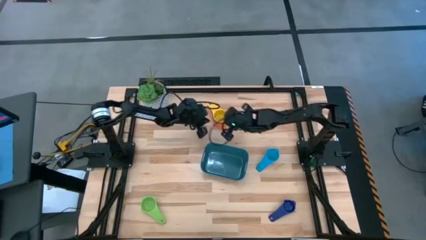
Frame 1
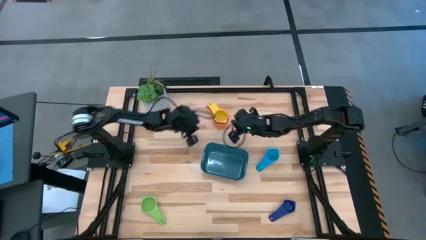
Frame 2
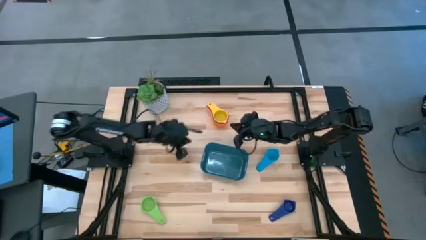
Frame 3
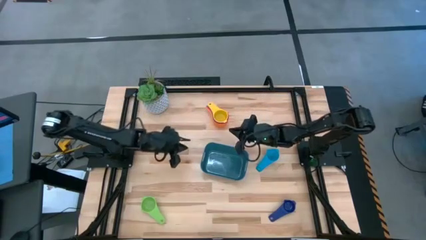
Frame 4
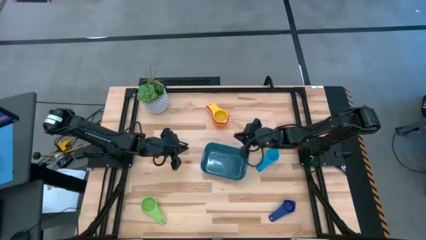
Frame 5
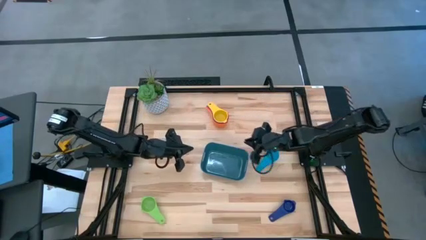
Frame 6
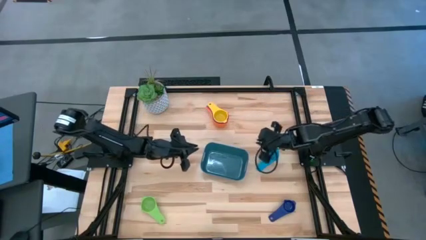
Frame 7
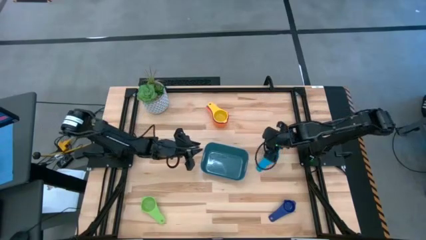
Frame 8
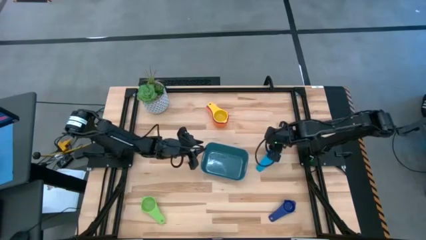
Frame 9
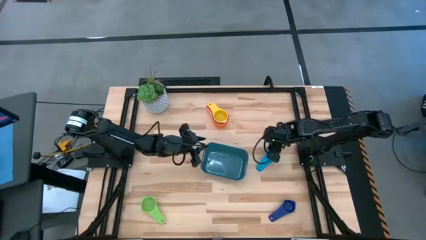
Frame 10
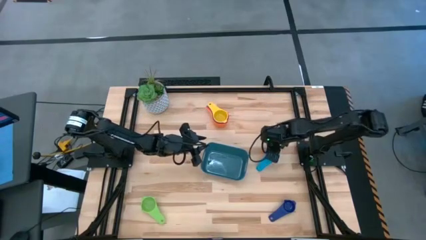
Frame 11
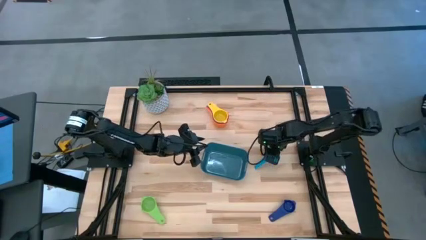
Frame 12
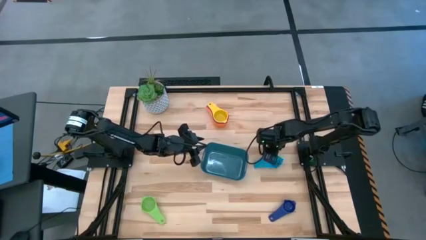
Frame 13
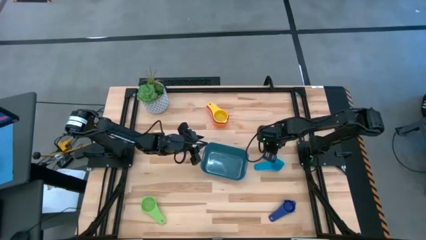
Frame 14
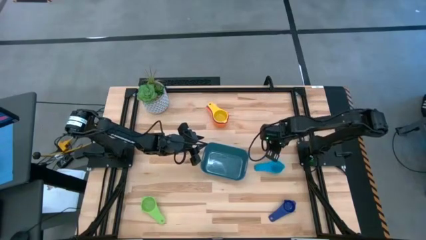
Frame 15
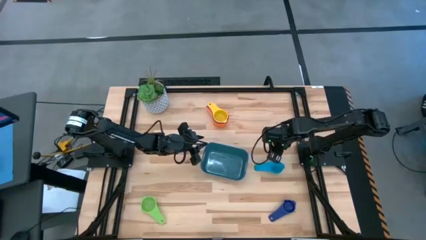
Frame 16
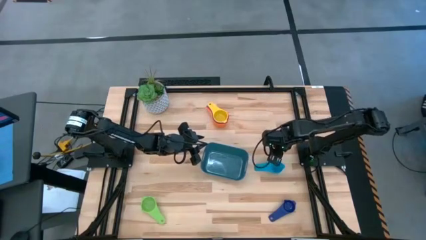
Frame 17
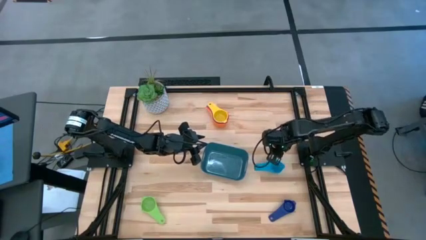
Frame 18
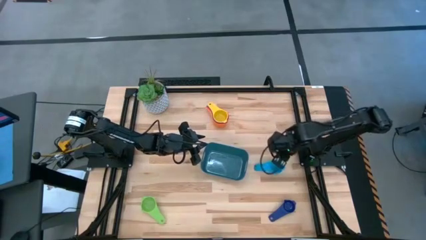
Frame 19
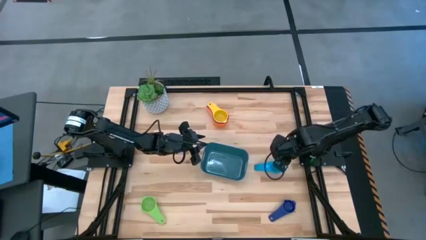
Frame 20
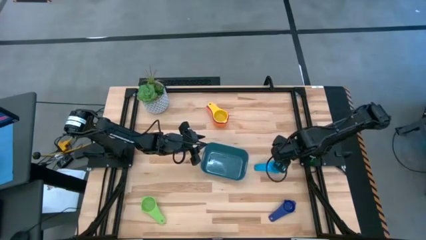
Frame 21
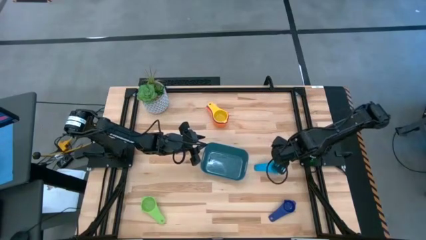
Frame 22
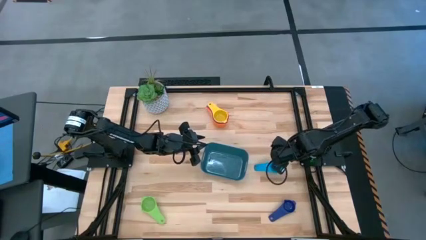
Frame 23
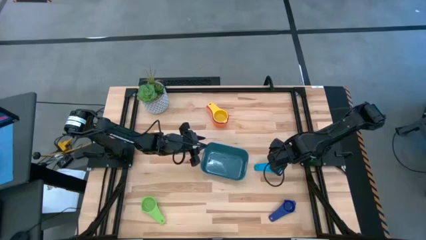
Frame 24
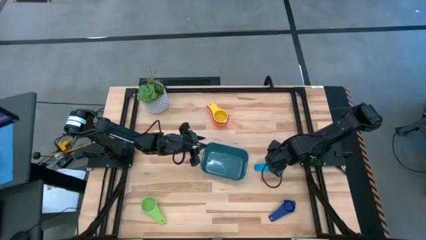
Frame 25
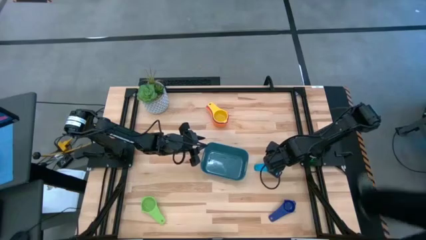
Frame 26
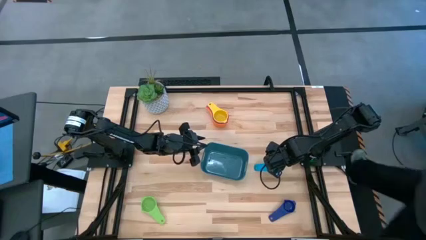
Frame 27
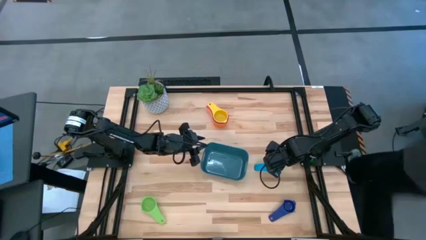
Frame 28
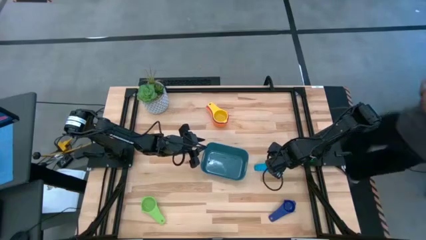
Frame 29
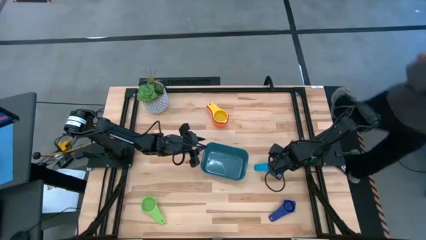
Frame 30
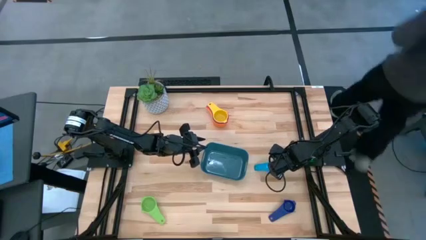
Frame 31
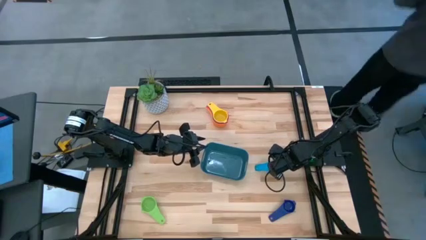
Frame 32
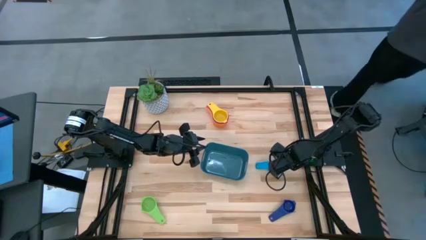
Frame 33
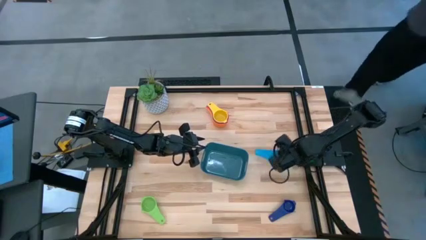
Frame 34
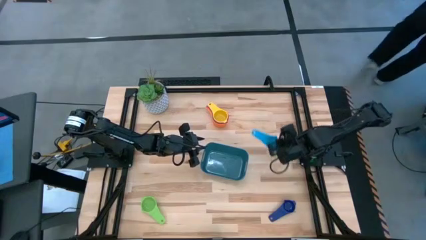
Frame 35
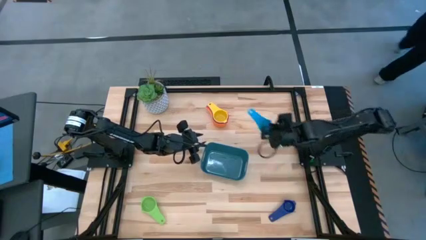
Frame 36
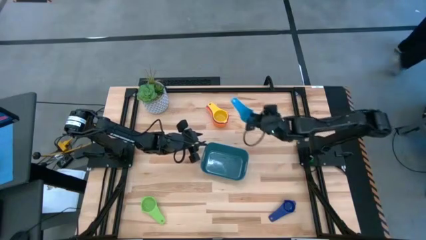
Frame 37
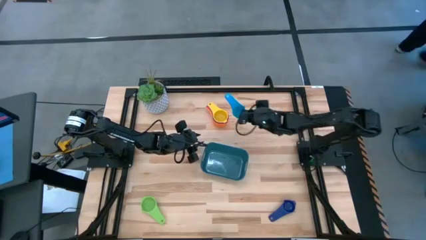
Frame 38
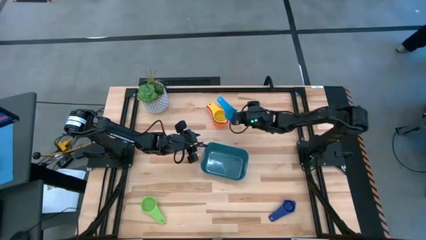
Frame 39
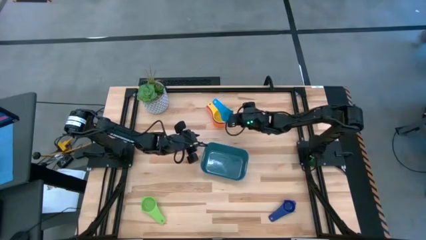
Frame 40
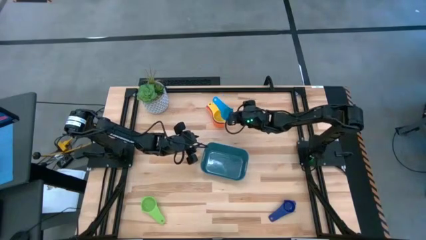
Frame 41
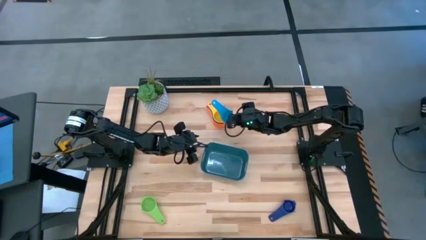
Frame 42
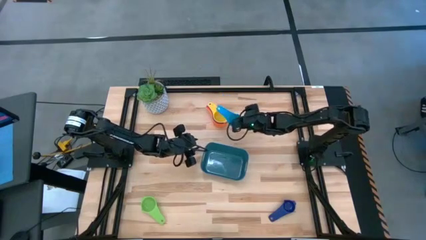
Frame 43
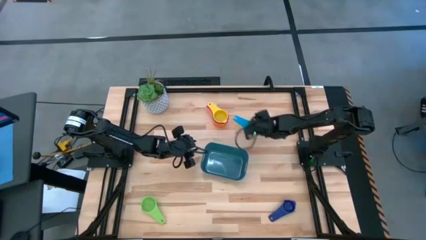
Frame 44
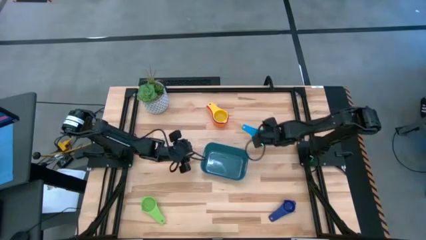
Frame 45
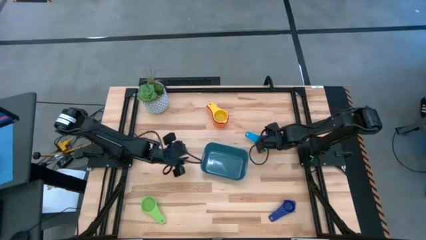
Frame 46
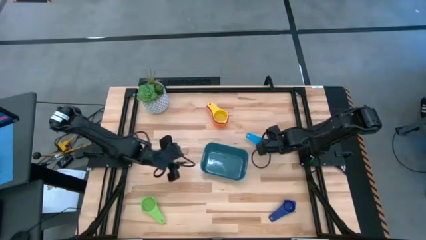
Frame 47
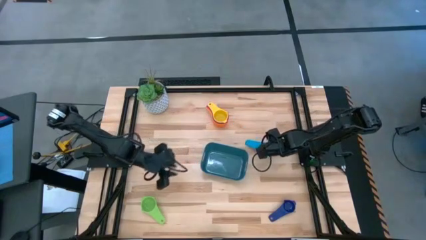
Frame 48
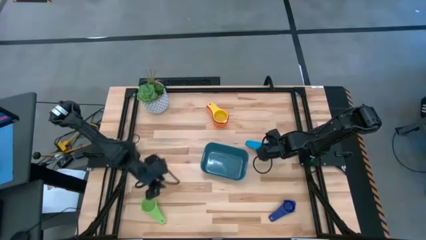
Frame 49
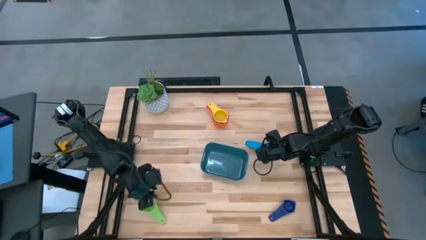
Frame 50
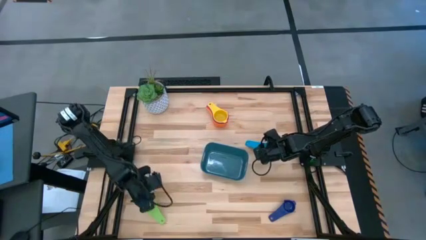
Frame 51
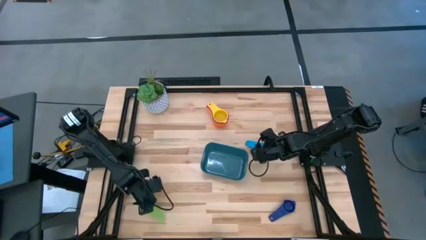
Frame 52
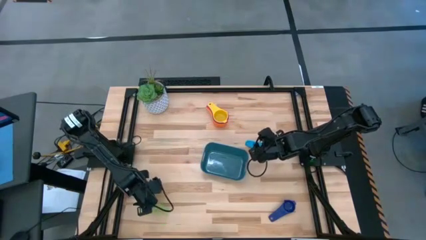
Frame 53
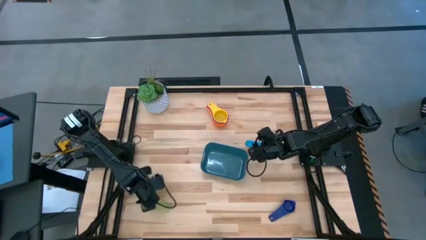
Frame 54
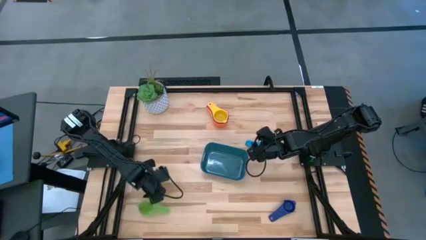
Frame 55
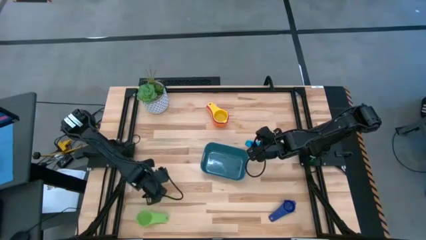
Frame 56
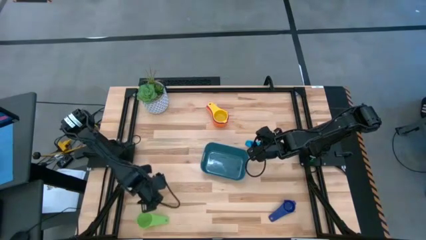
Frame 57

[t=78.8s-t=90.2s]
Task: Nest measuring cups in basket
Stack the green measuring cup on top of the yellow measuring cup

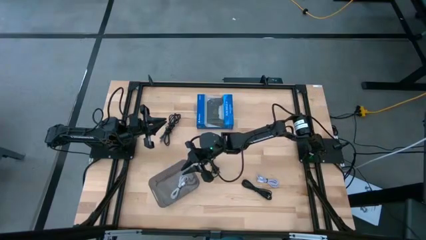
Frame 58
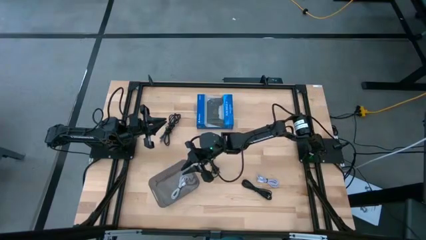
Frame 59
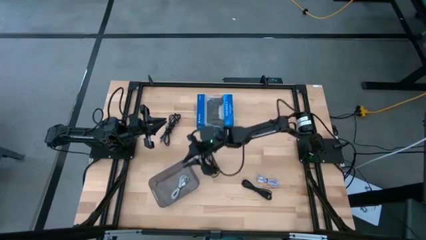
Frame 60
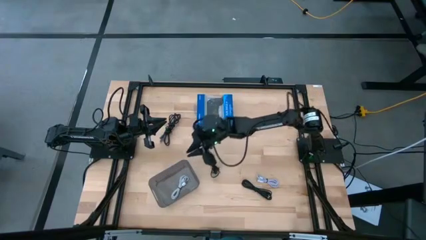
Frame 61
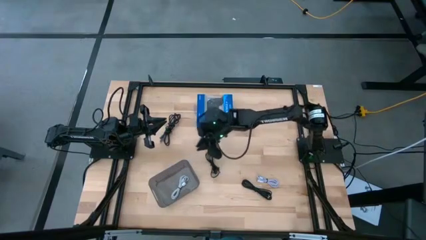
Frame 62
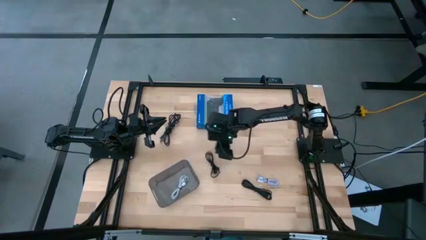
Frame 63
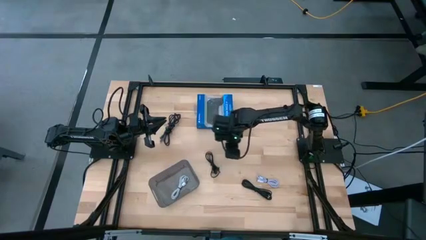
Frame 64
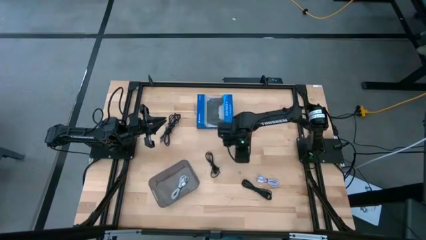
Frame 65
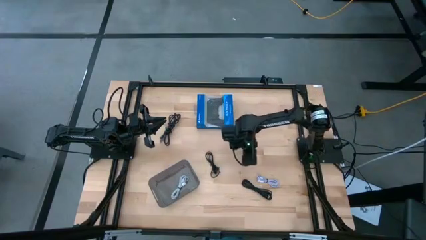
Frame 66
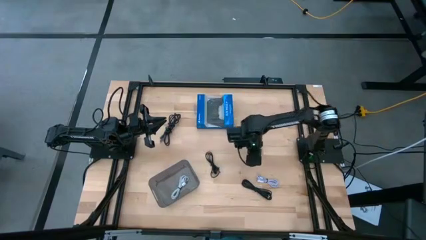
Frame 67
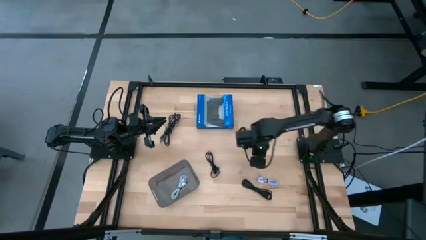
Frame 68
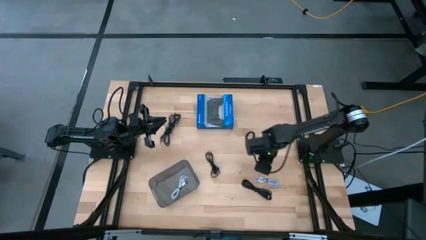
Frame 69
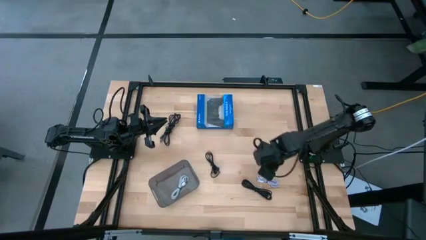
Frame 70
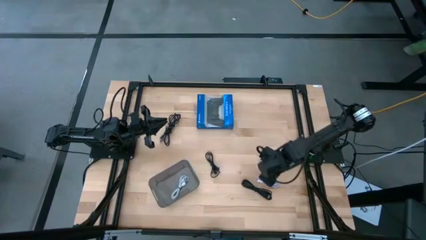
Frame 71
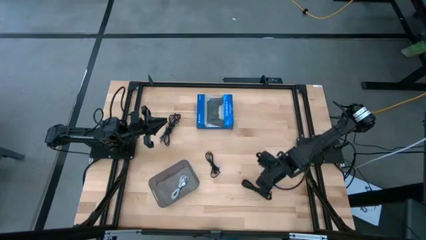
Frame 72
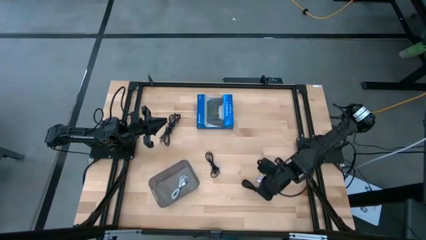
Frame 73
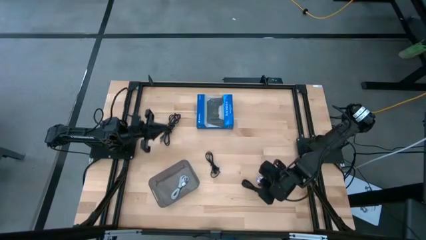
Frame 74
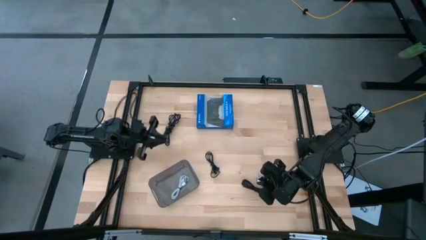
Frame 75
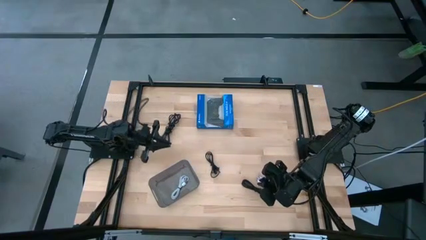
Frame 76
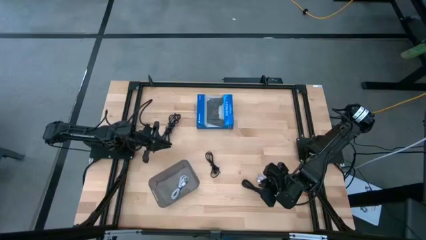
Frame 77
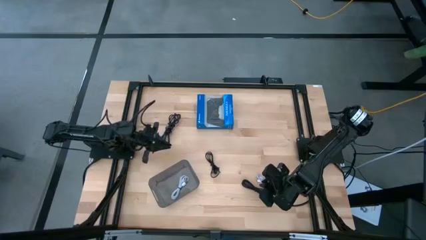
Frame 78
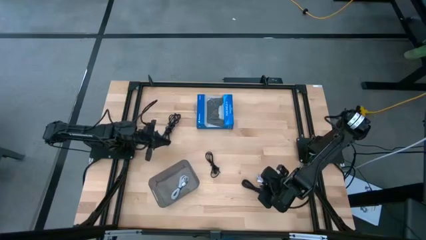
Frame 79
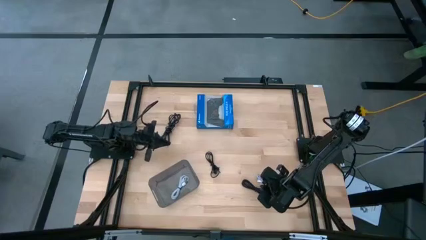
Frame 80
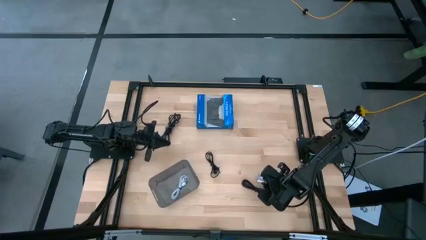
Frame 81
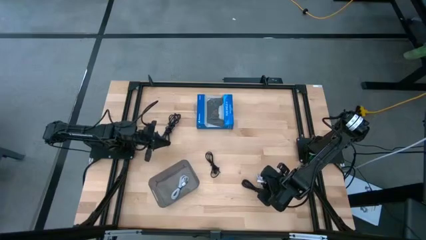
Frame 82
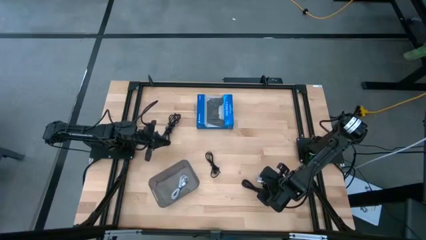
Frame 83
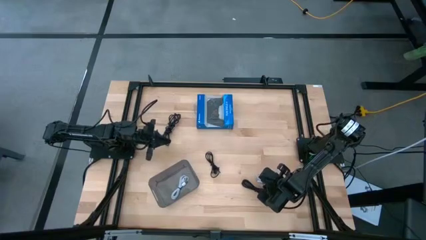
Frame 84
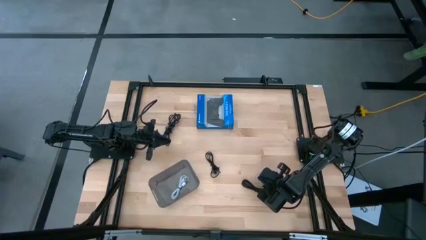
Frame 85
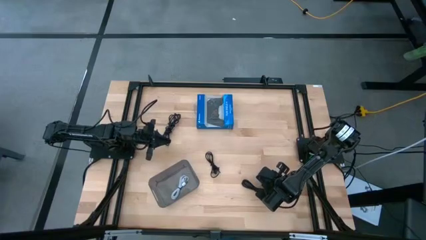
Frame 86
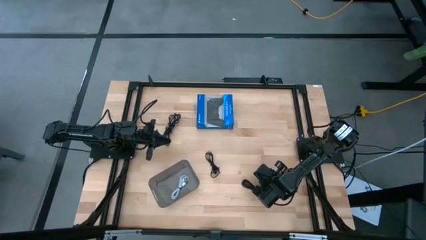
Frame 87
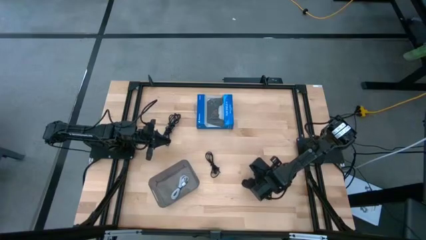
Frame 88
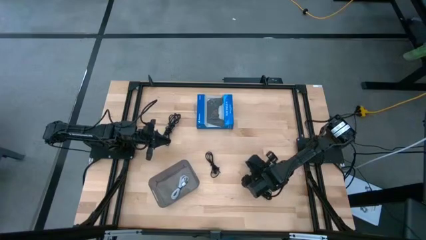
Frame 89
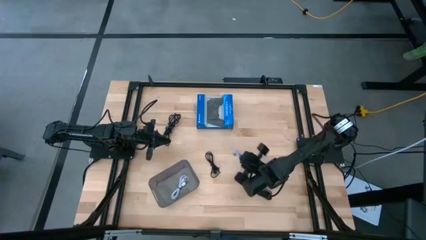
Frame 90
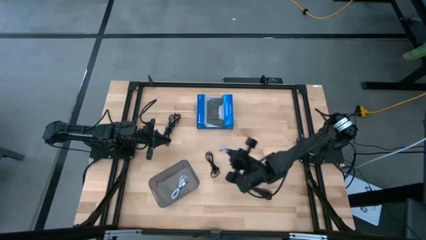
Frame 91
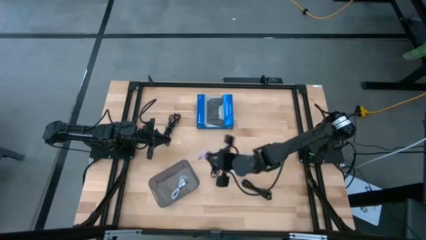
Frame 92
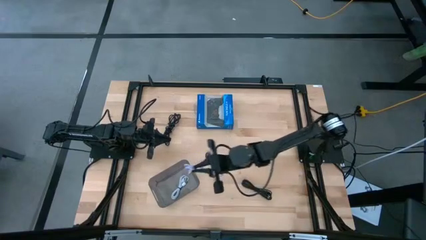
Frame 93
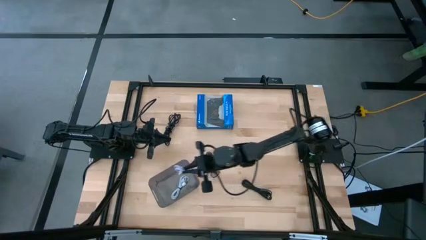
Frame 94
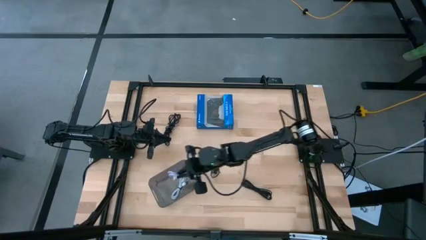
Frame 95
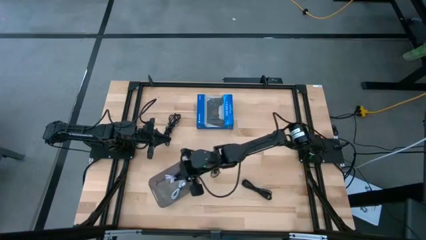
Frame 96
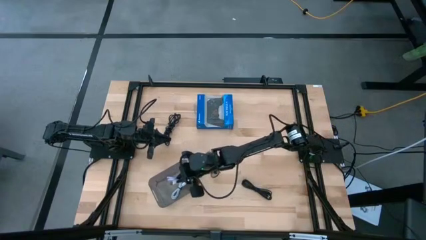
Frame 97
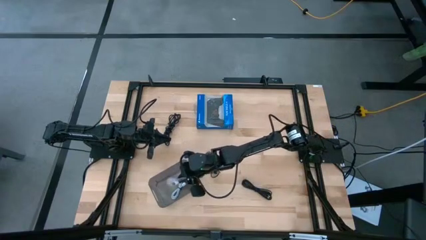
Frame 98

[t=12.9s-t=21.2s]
Task: Pick and place USB-C Cables
Put the purple charger cable into the black bin
